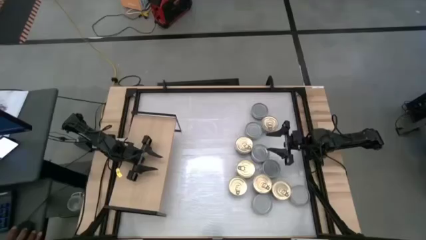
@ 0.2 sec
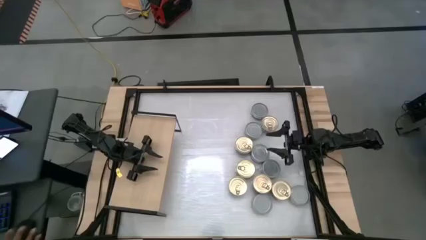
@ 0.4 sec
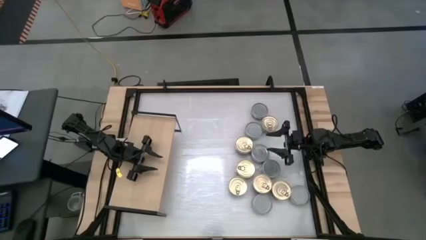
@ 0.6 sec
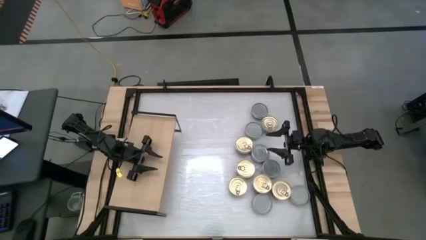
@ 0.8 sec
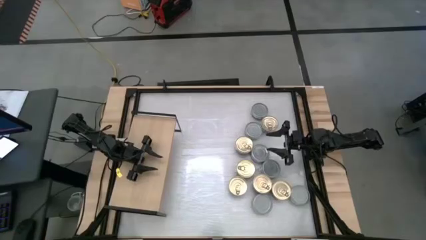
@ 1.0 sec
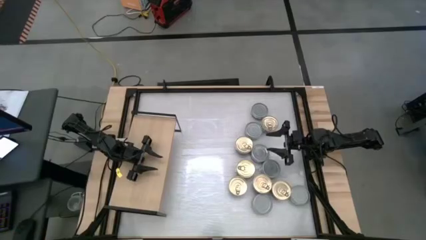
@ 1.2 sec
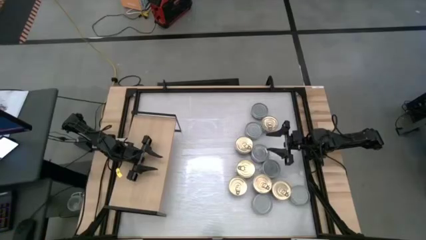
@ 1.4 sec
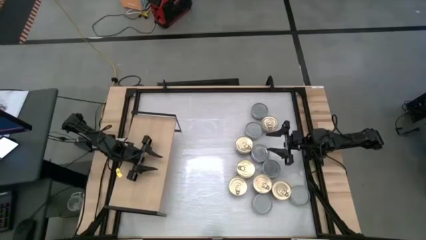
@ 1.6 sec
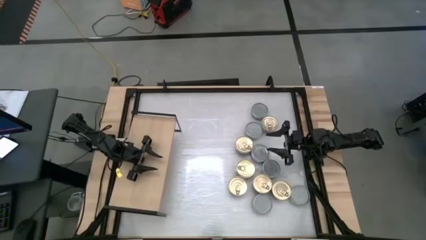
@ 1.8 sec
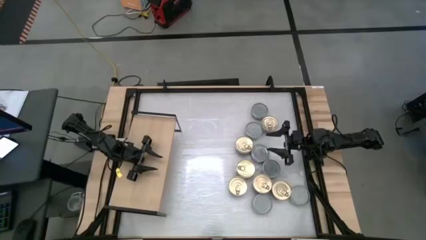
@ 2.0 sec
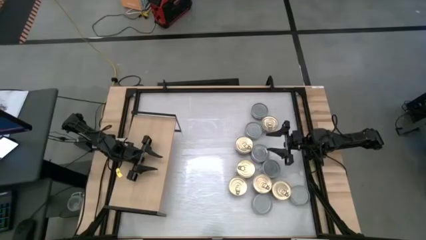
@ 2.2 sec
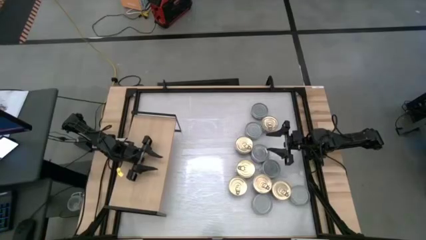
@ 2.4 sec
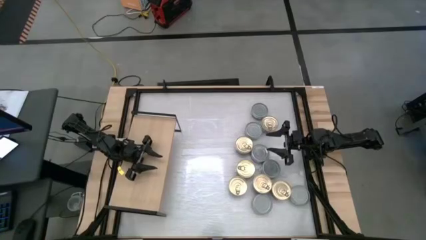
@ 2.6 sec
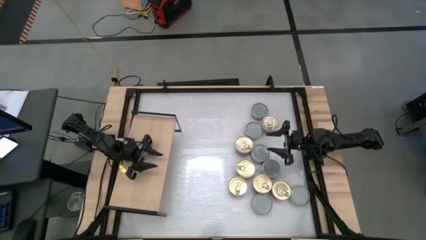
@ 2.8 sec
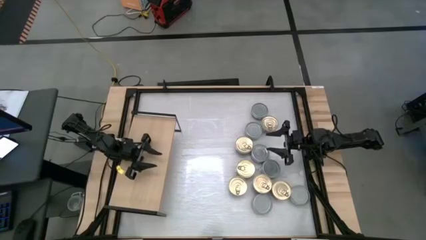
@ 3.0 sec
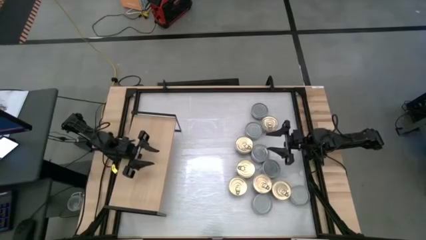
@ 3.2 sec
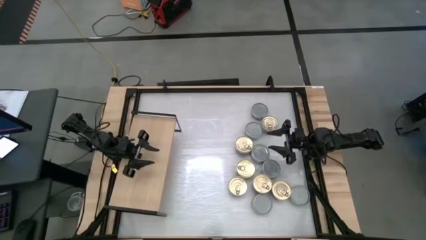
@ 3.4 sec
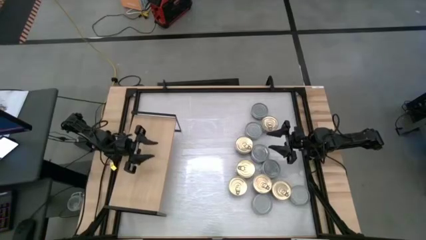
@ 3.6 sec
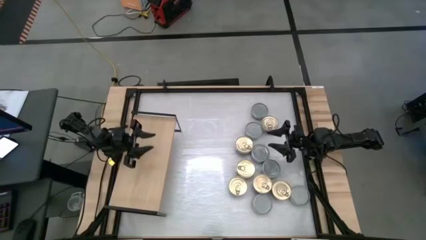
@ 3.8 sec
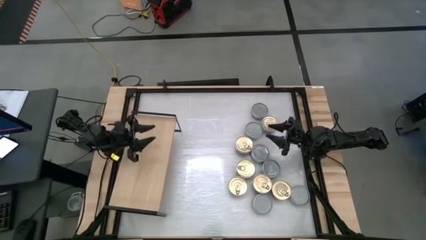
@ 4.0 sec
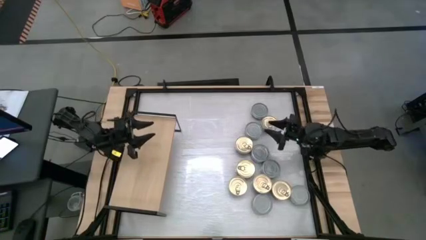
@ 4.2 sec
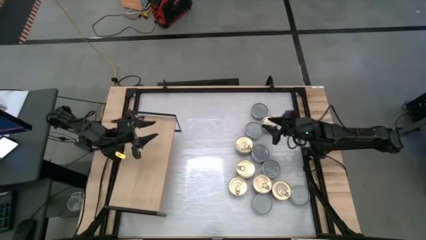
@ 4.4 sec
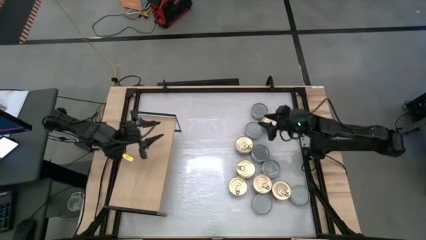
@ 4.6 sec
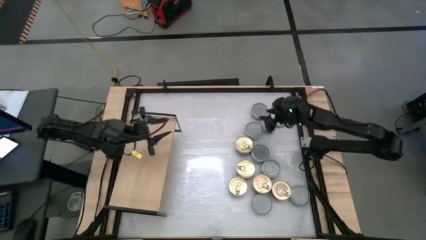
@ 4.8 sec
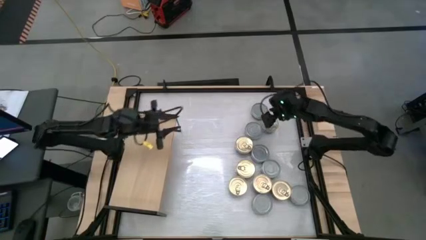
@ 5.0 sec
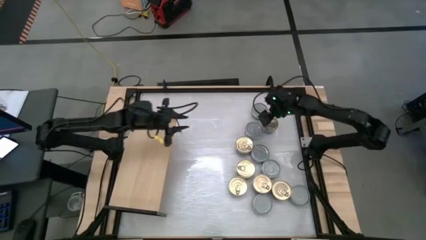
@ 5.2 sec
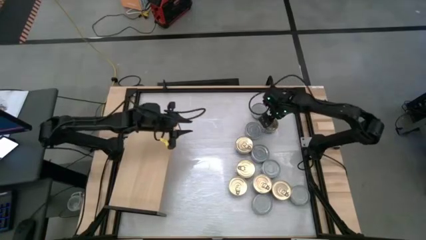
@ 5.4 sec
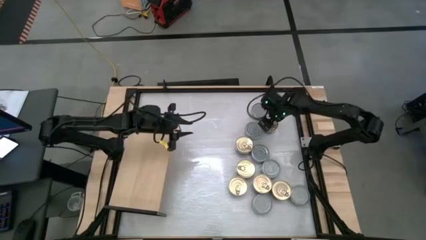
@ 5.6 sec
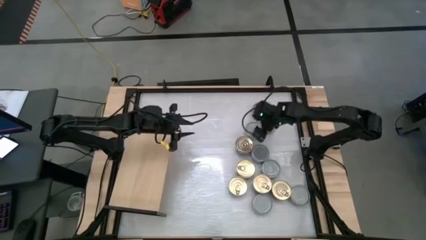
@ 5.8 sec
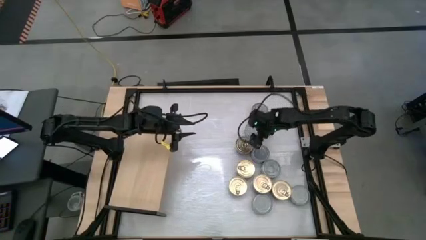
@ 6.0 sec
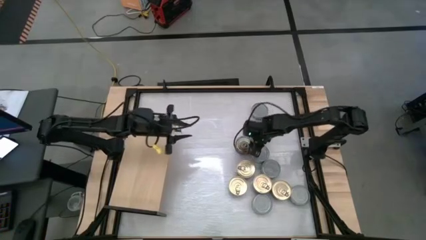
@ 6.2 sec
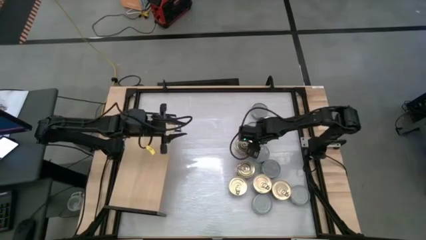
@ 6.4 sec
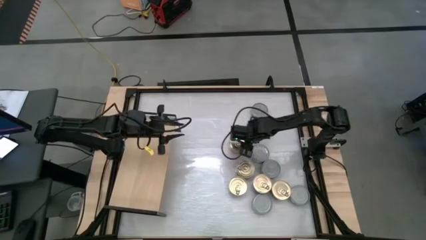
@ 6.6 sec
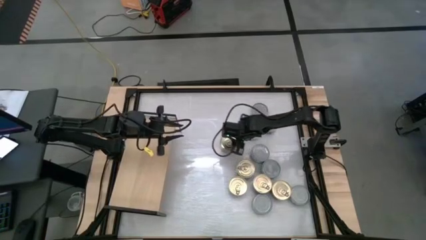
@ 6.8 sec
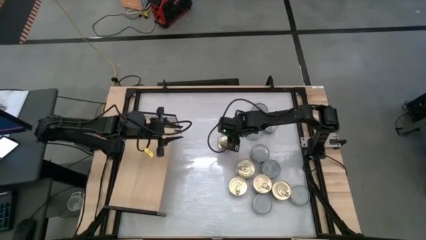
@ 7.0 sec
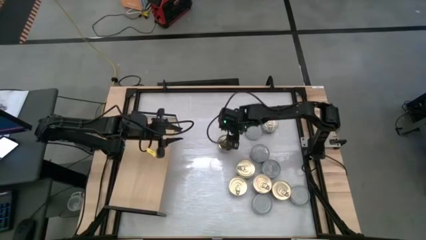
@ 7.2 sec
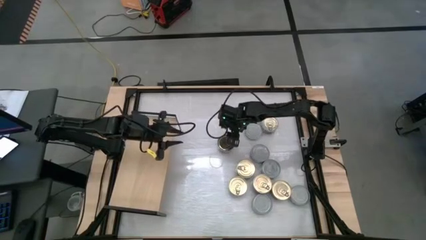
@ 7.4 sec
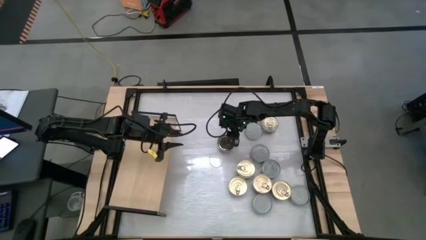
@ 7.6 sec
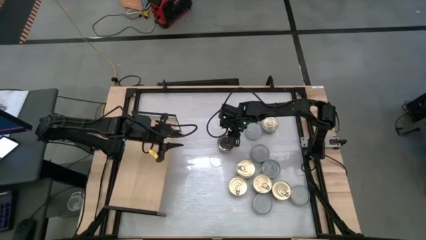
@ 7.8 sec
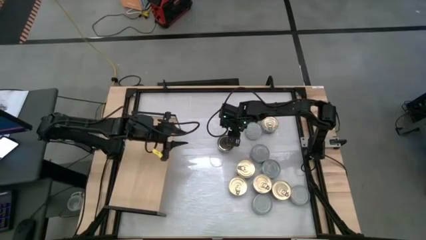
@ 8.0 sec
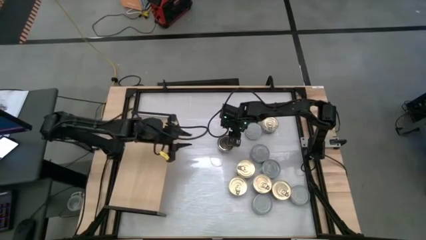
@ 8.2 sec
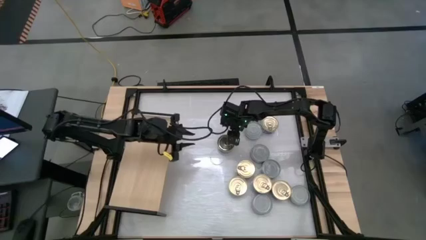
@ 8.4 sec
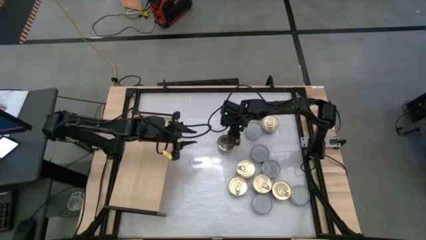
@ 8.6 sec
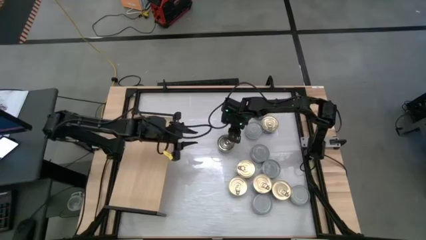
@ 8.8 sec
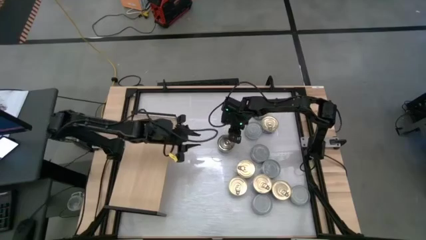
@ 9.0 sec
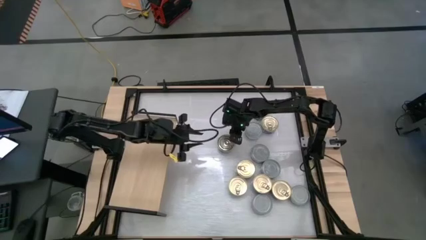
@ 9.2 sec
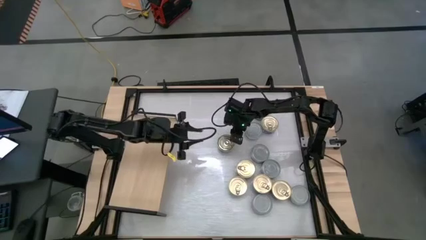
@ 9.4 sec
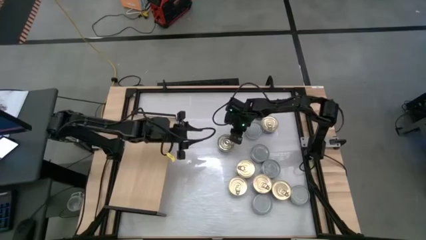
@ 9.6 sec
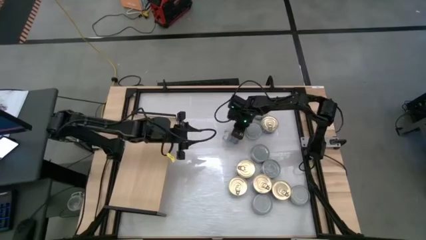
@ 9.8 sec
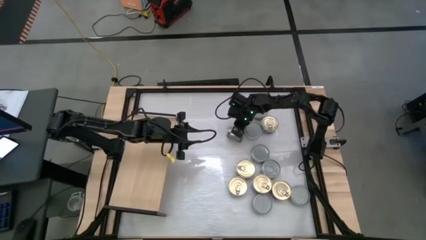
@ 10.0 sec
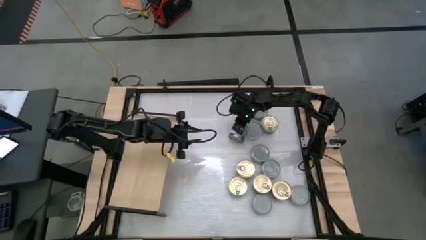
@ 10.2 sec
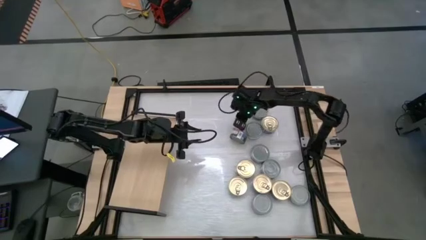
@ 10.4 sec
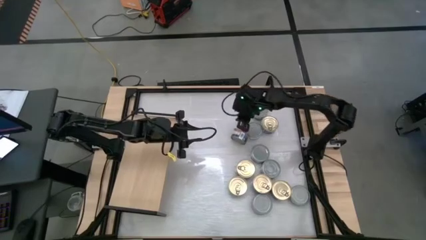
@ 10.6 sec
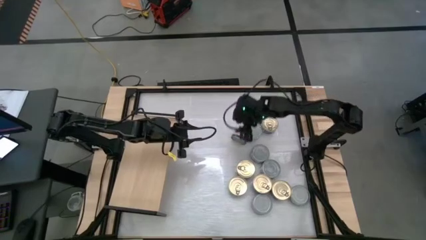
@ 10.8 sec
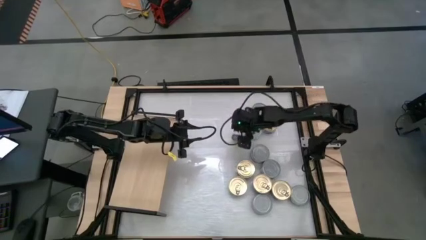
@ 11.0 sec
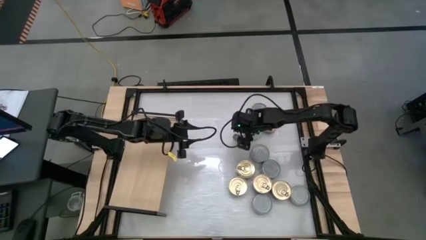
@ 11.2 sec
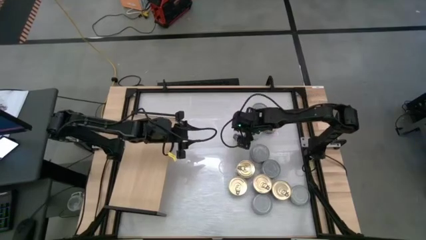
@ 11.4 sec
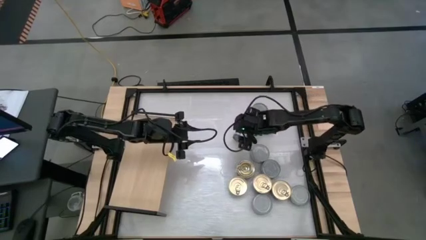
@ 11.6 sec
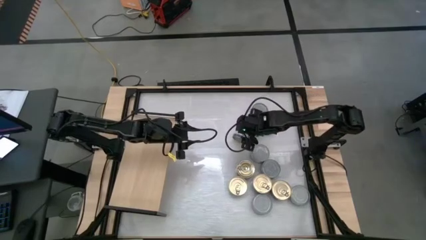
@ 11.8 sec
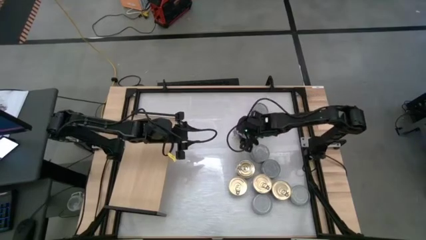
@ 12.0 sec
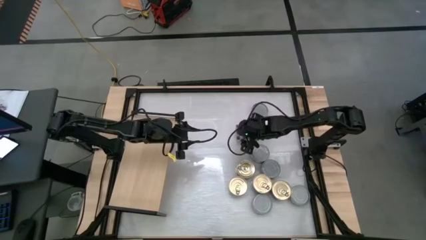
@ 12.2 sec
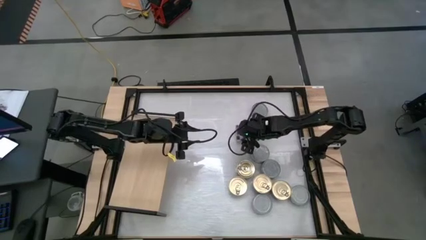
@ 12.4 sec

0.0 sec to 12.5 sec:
Task: Stack canned seafood by type on shelf
Put the blue tuna can on the shelf
